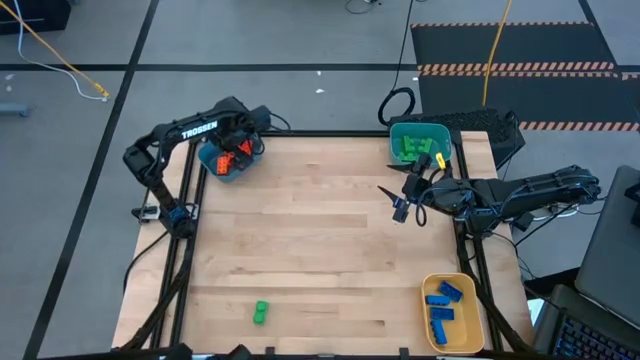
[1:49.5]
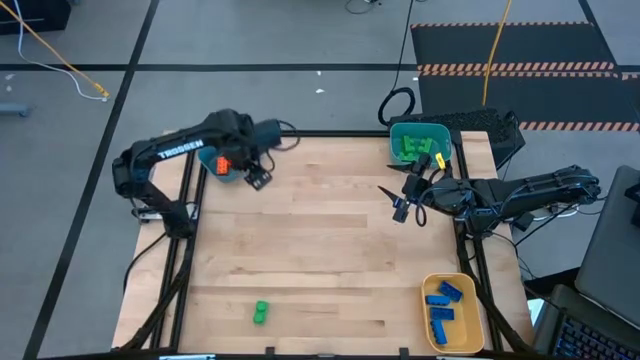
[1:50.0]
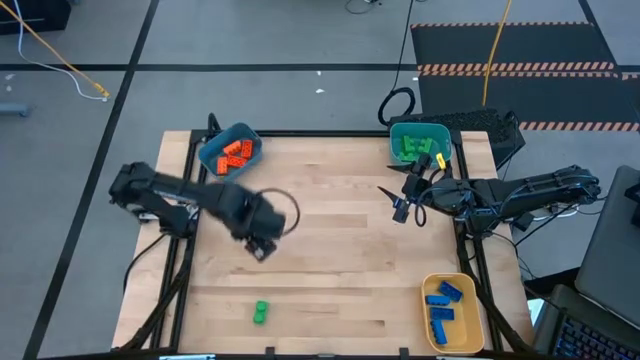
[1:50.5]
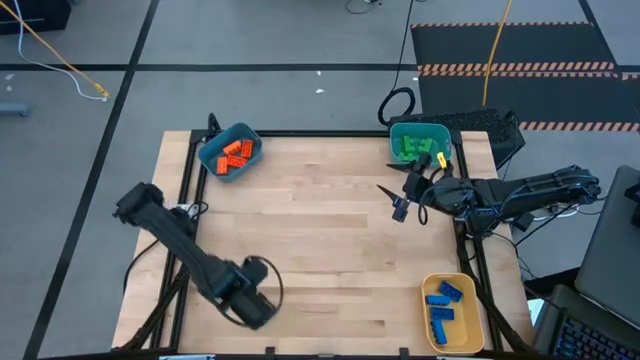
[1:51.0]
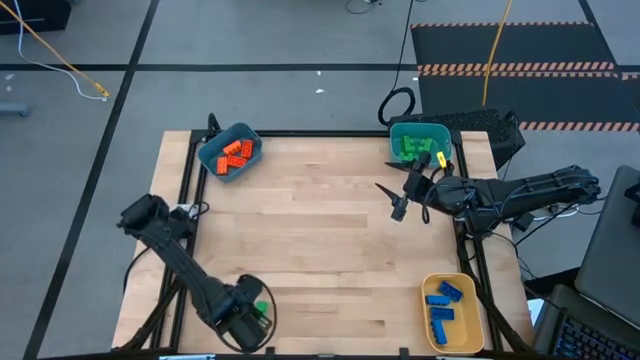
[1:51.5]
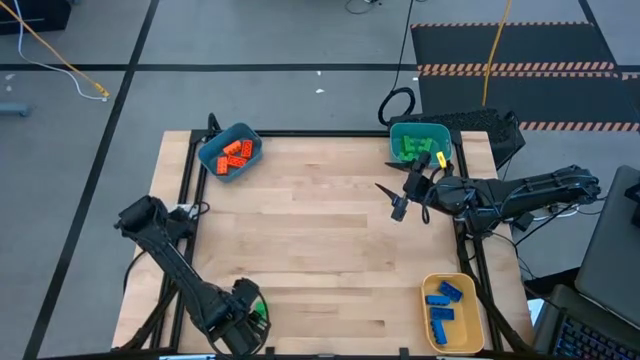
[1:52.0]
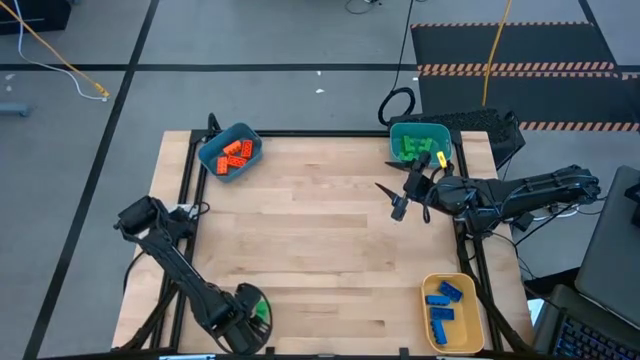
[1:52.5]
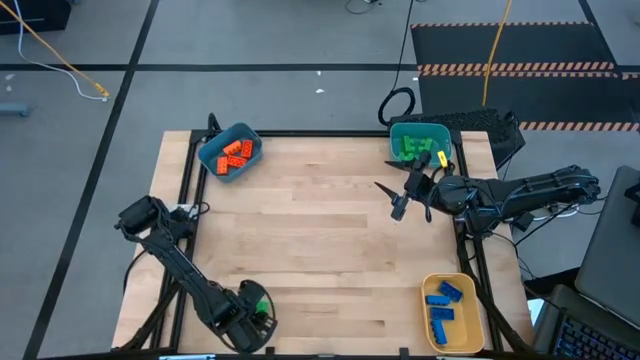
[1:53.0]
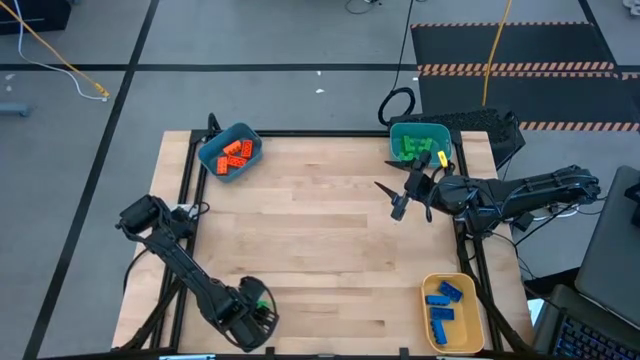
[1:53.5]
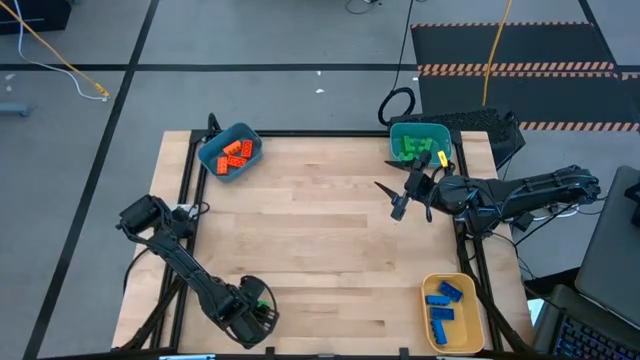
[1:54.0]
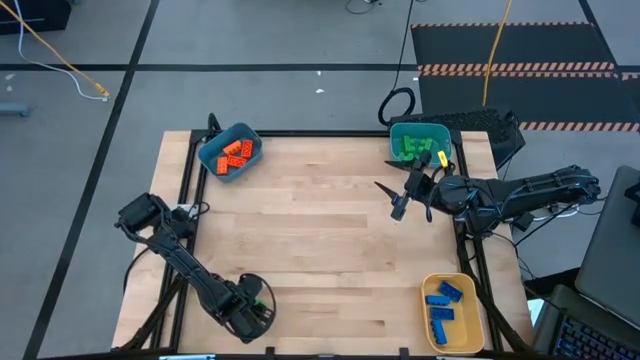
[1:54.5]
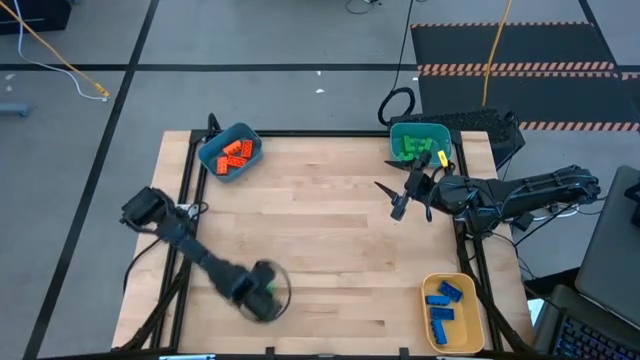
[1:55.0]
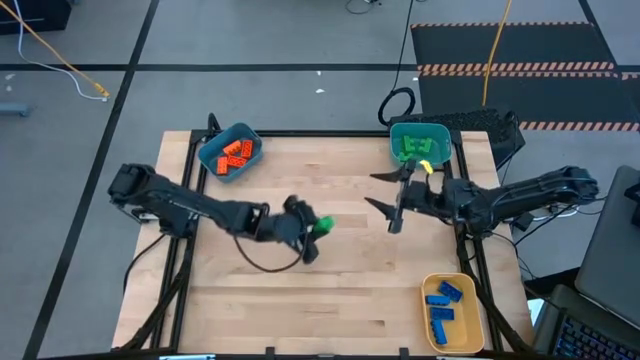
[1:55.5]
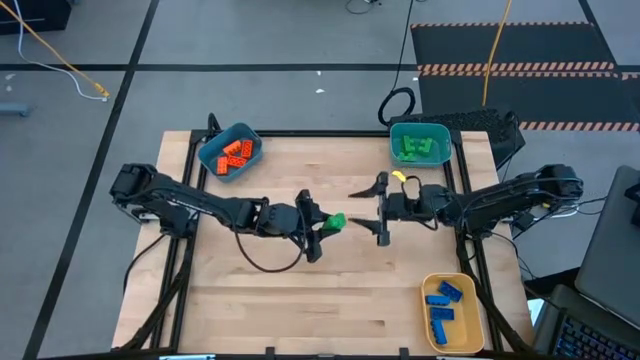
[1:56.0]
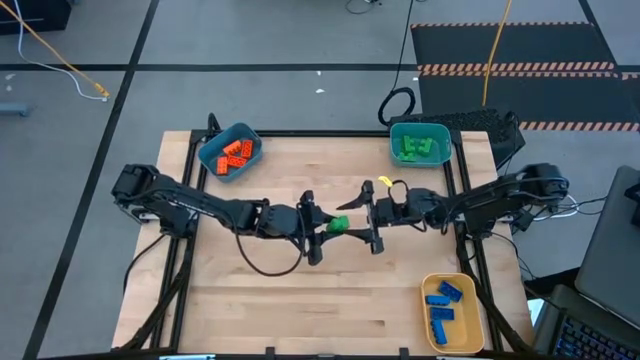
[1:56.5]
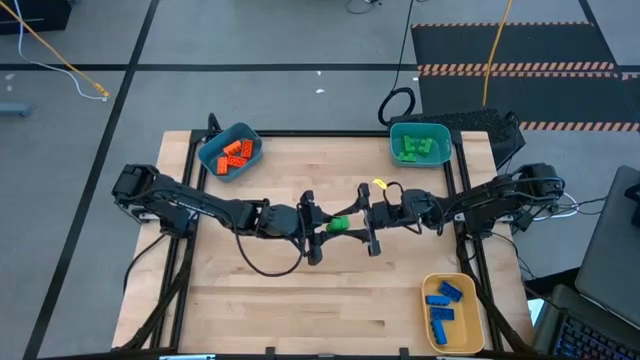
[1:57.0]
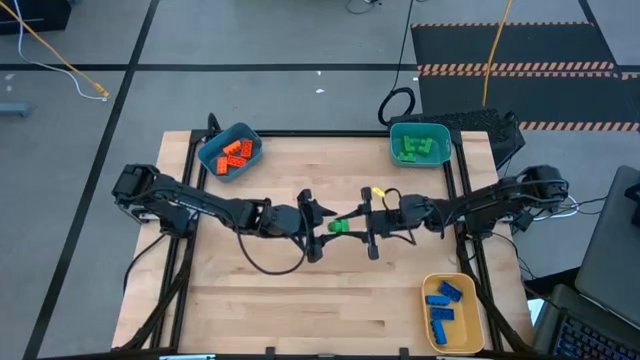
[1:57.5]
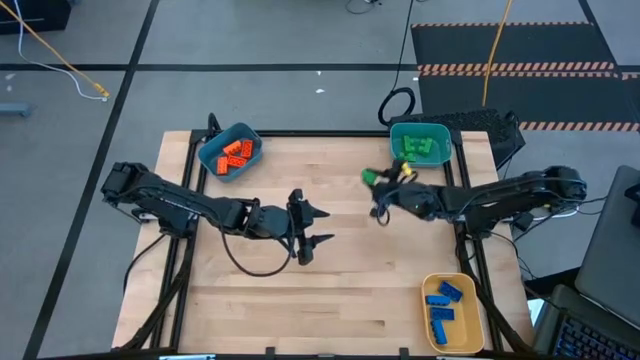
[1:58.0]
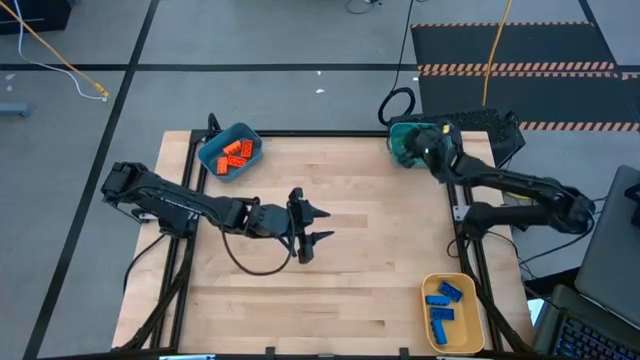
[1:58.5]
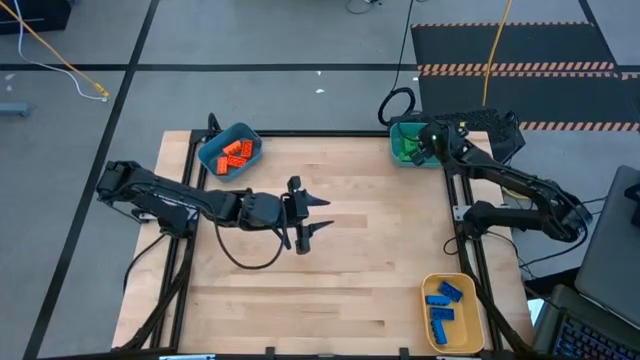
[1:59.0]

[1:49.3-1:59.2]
Task: Sort & place blocks by color
Put the green game piece into the light blue bin

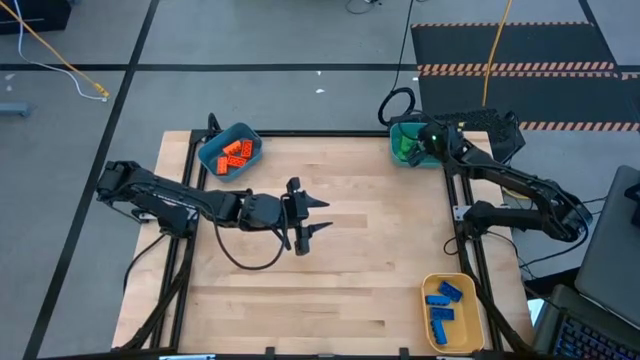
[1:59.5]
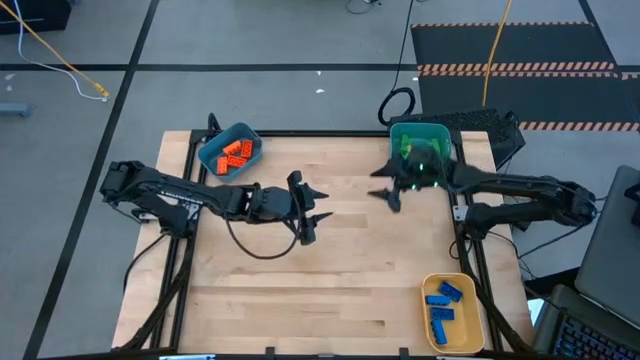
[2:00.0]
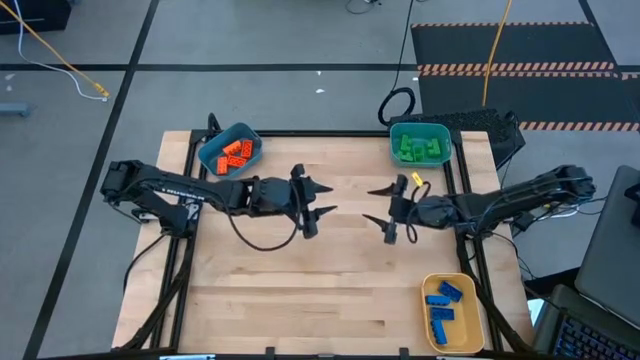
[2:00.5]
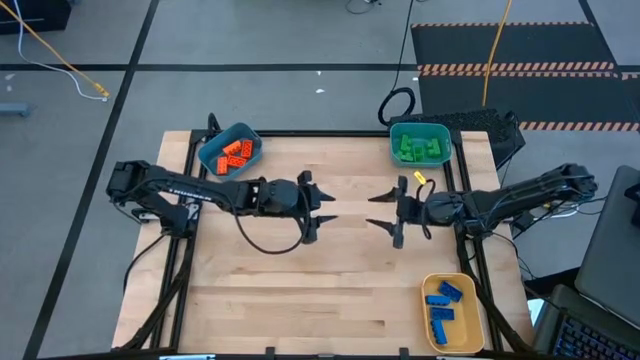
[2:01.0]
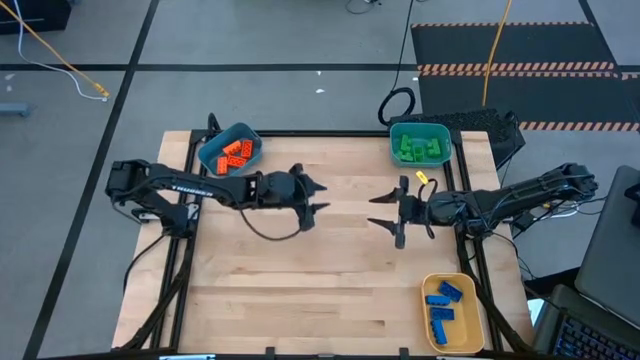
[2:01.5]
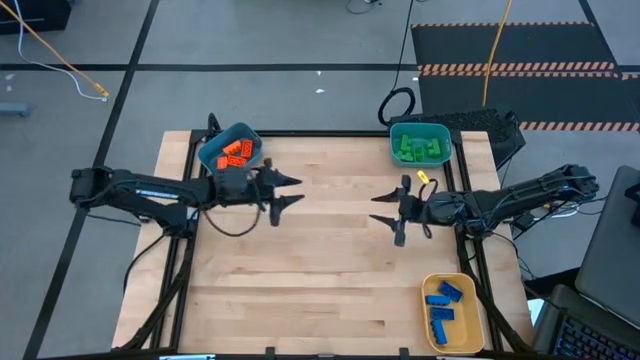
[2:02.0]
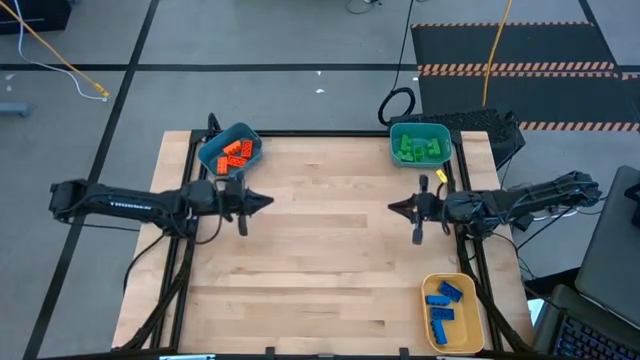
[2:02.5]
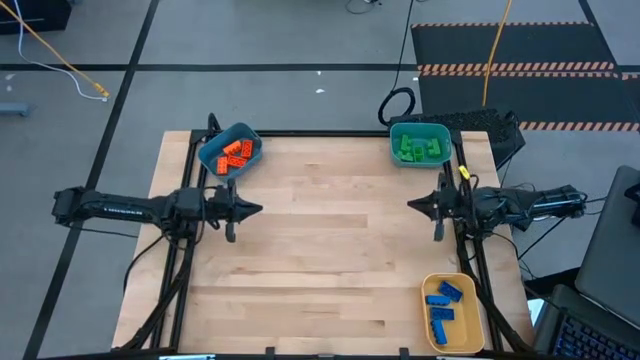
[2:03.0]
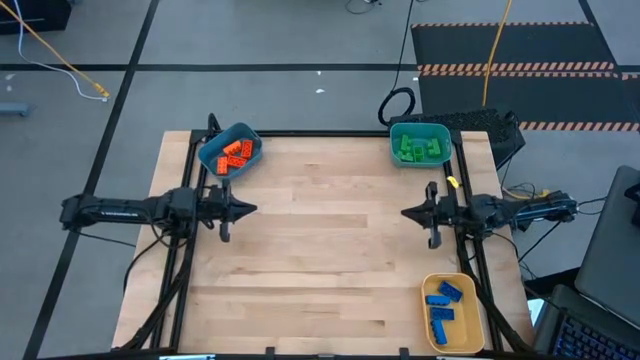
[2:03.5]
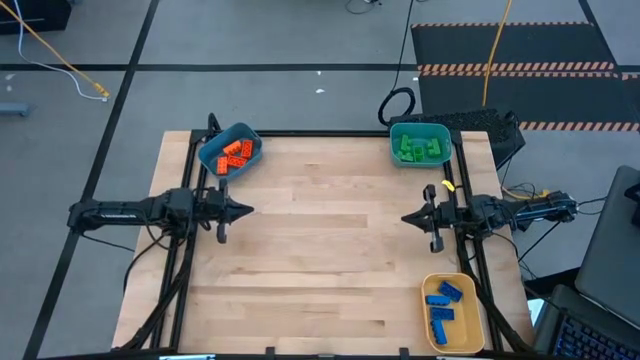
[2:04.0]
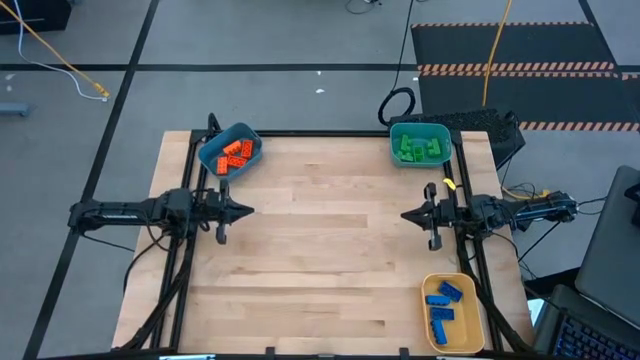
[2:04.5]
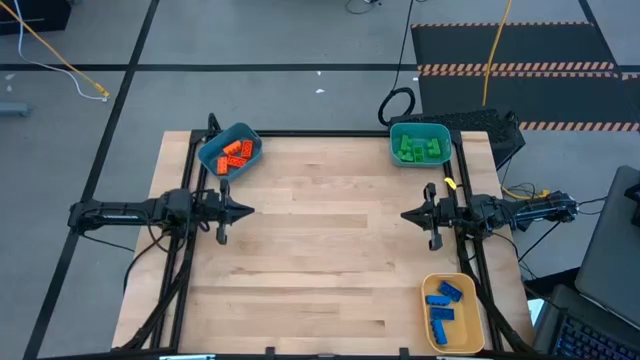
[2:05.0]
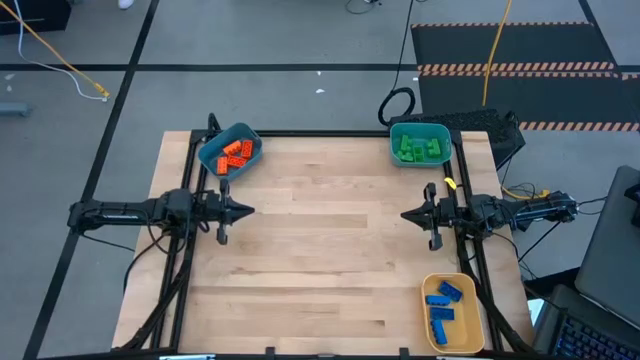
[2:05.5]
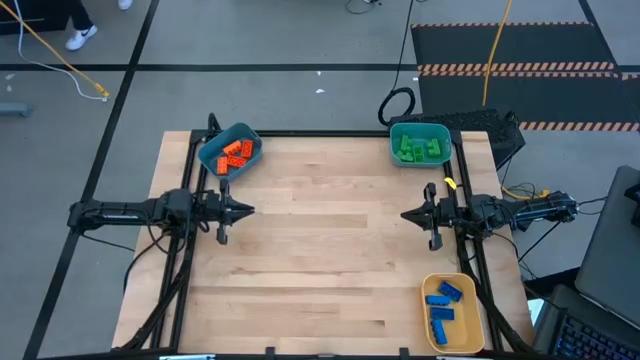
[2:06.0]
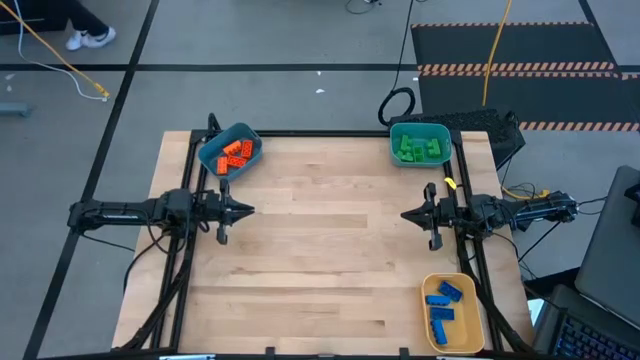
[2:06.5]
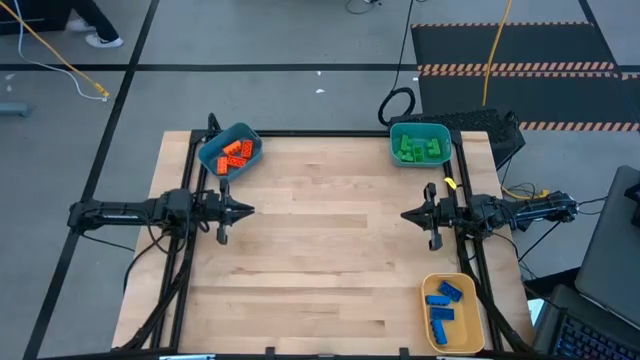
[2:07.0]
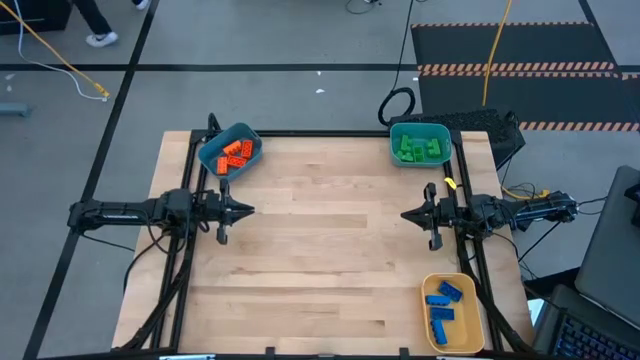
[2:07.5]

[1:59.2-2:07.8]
Return to Home Position

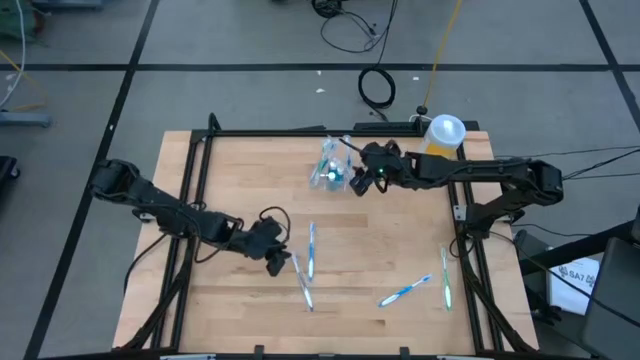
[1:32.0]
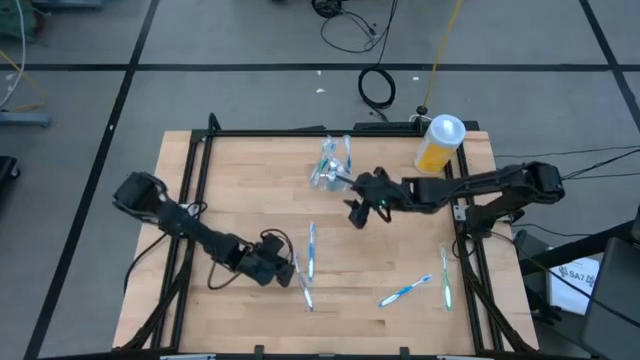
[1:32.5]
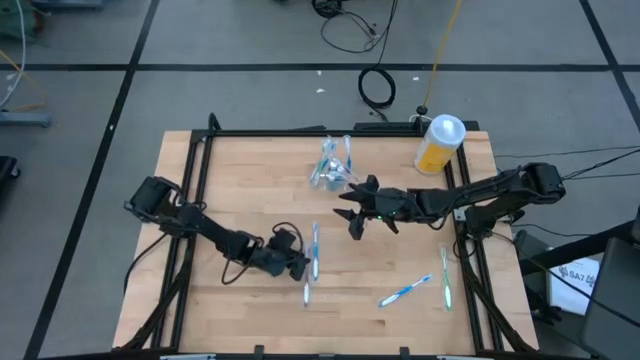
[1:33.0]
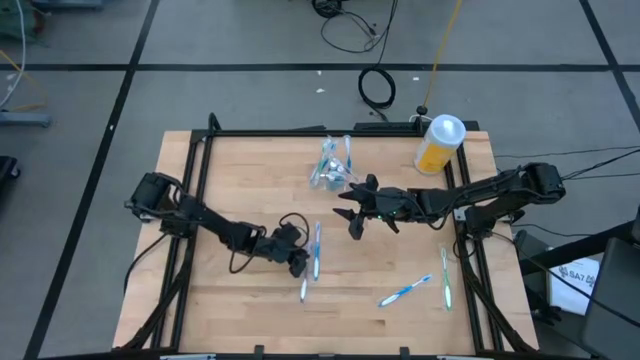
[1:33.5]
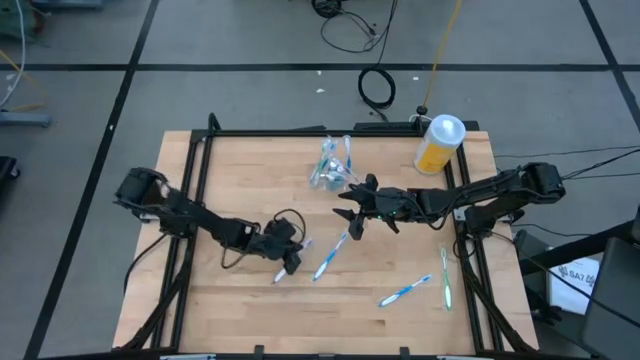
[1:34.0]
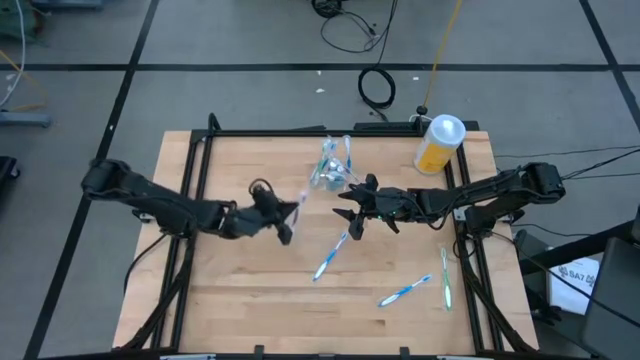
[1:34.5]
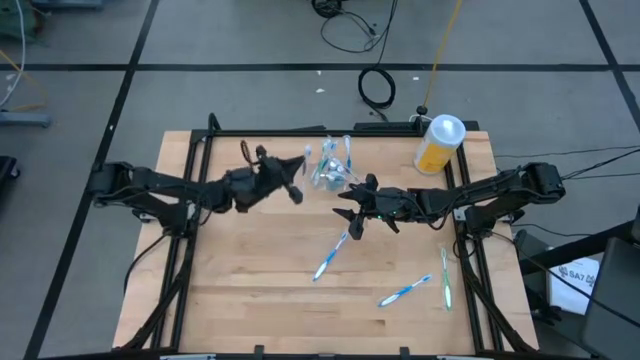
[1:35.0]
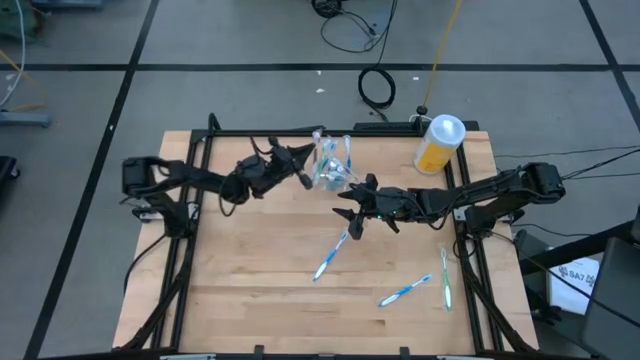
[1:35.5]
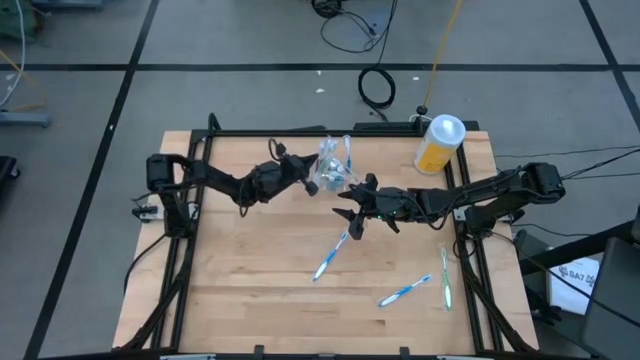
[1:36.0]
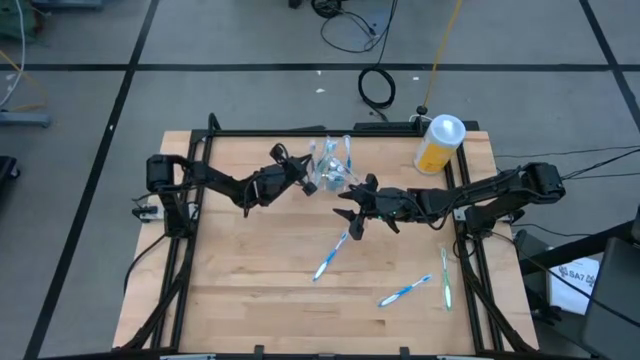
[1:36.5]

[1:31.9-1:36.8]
Task: Pick & Place toothbrushing station
Put the purple toothbrush into the transparent organizer
